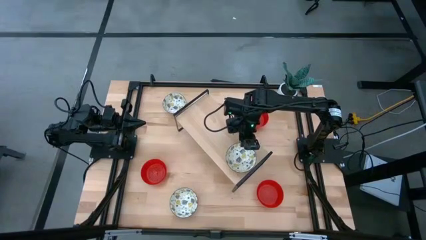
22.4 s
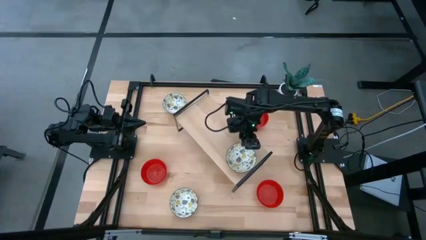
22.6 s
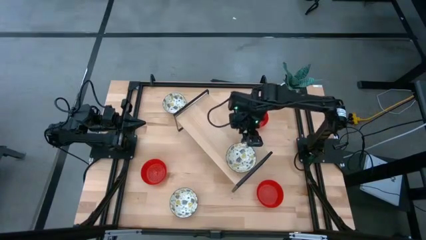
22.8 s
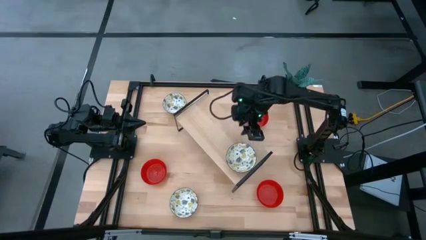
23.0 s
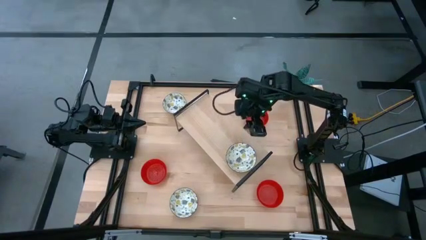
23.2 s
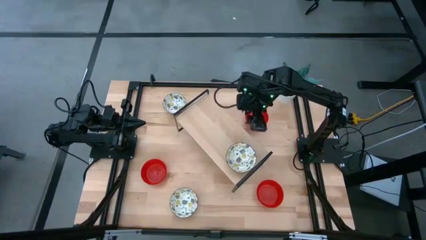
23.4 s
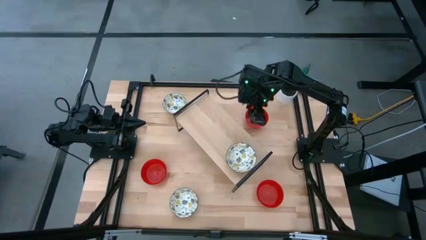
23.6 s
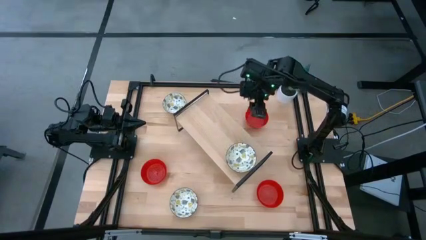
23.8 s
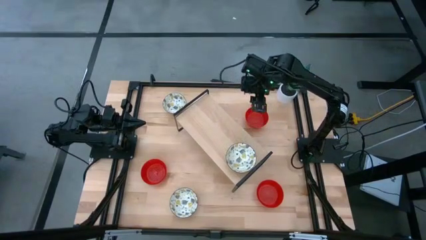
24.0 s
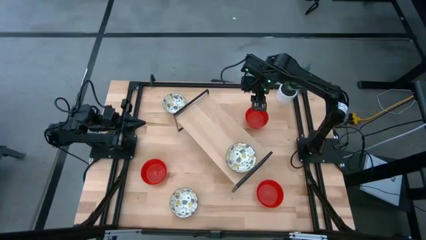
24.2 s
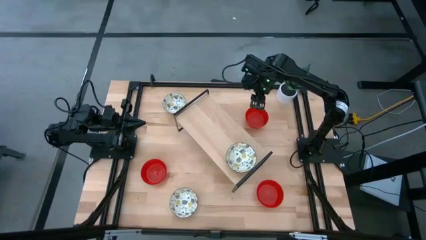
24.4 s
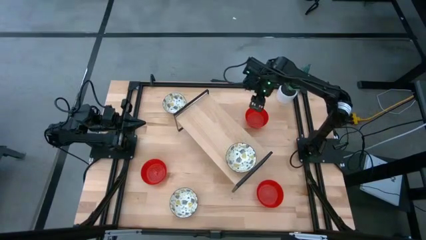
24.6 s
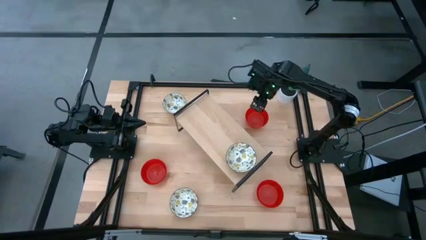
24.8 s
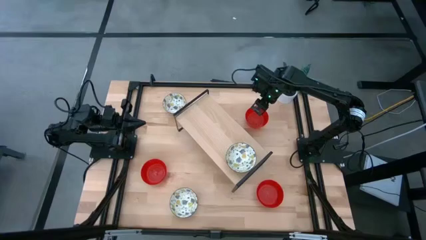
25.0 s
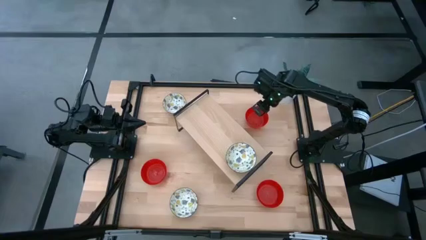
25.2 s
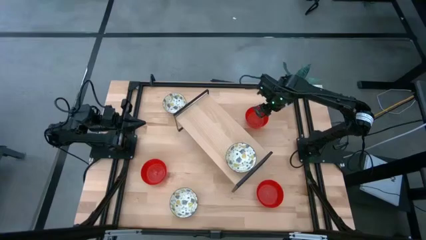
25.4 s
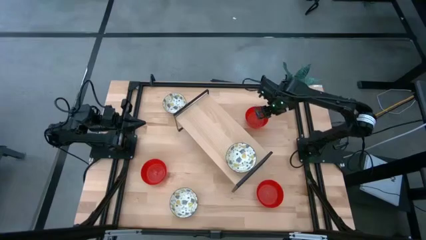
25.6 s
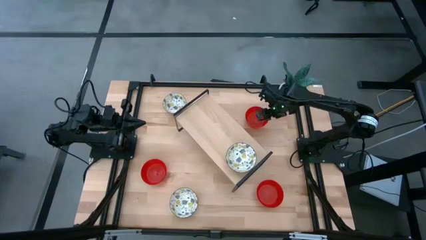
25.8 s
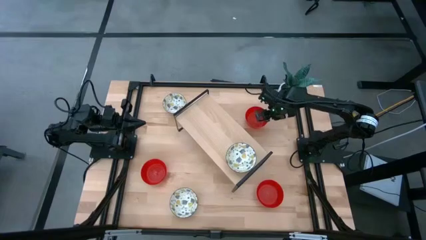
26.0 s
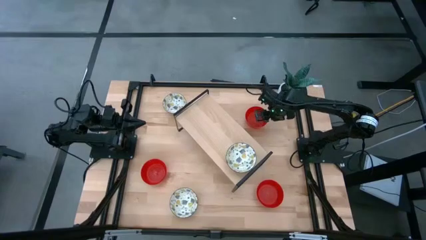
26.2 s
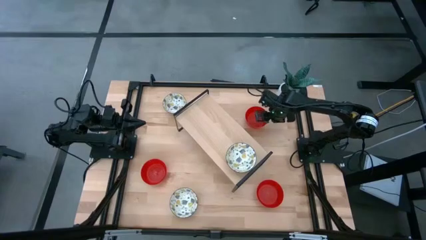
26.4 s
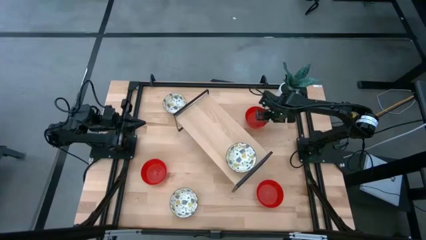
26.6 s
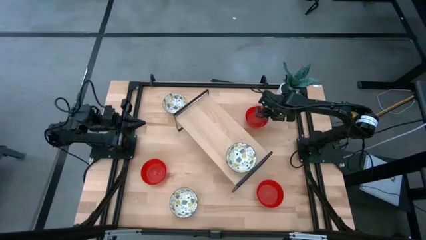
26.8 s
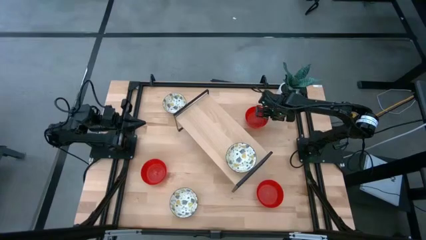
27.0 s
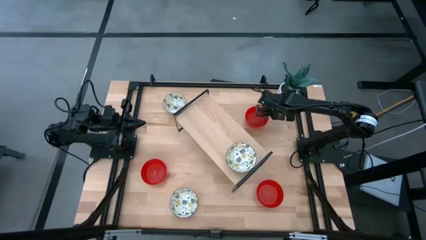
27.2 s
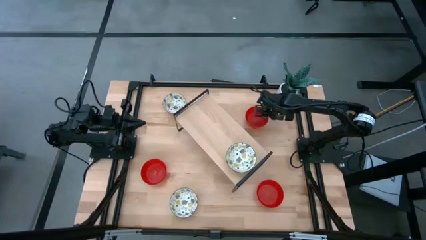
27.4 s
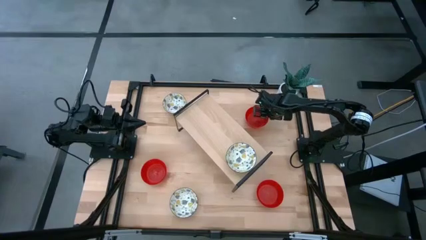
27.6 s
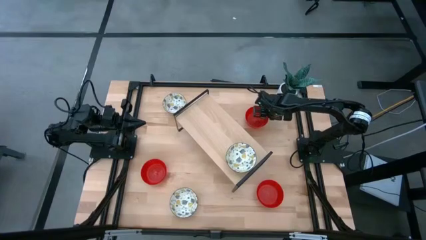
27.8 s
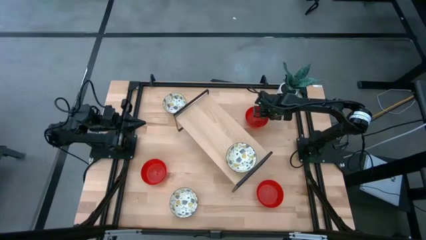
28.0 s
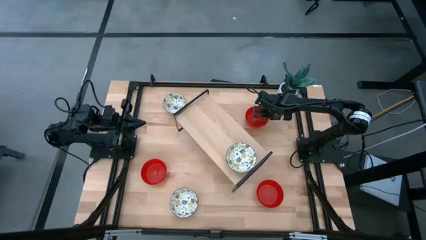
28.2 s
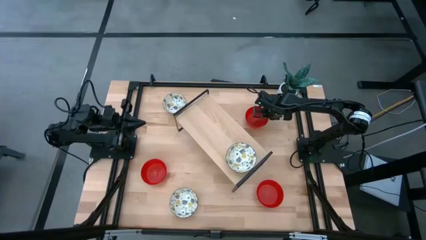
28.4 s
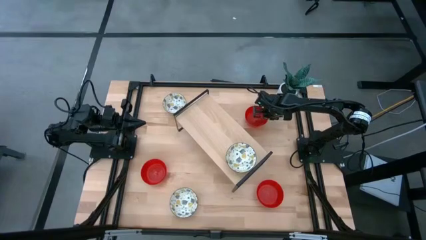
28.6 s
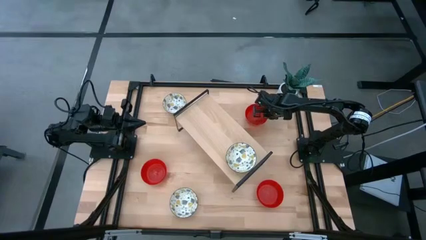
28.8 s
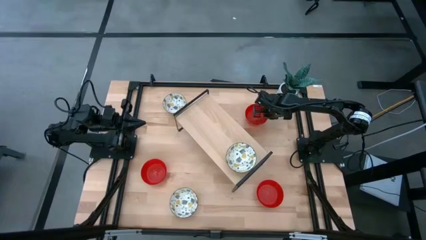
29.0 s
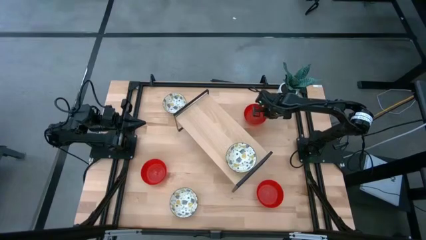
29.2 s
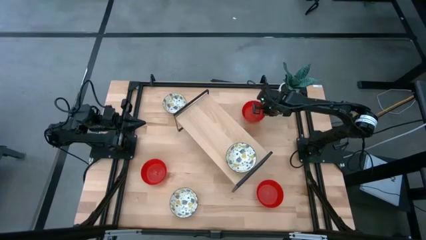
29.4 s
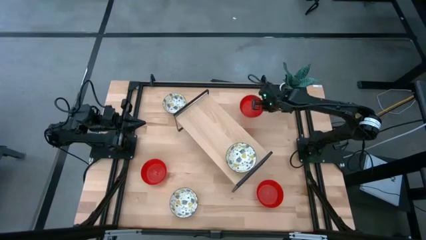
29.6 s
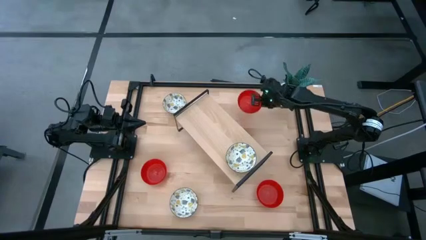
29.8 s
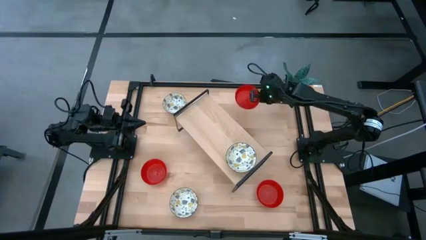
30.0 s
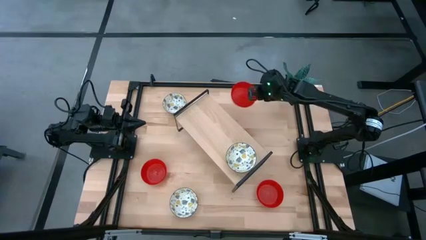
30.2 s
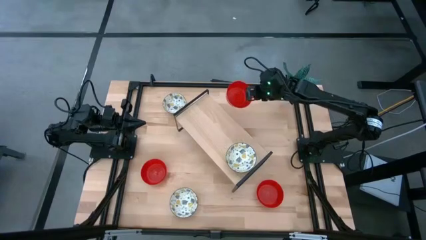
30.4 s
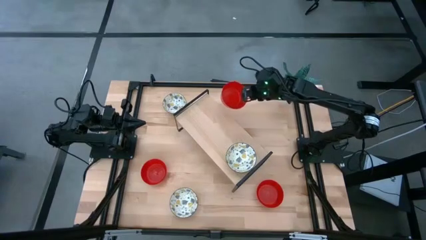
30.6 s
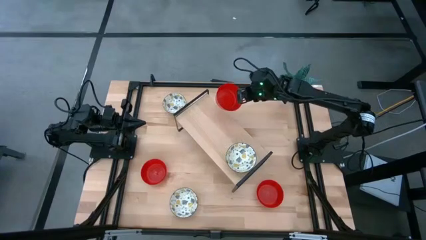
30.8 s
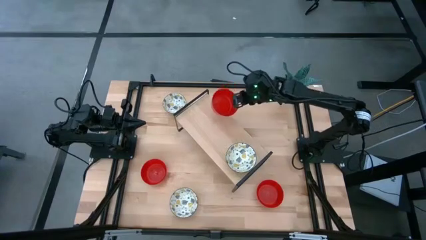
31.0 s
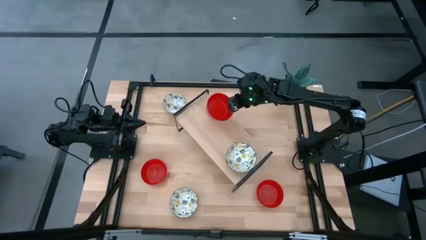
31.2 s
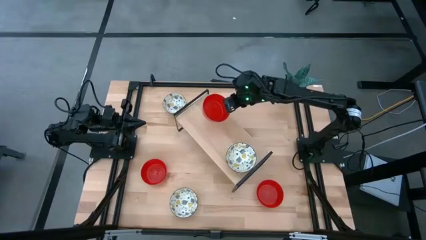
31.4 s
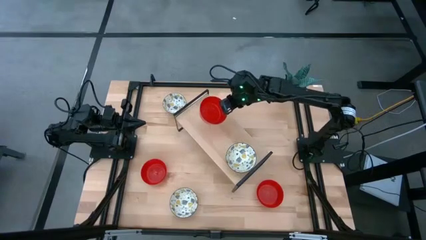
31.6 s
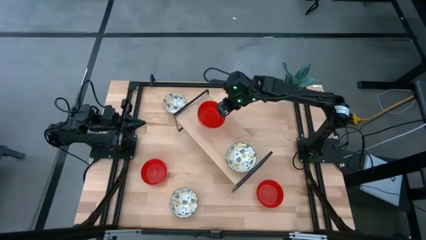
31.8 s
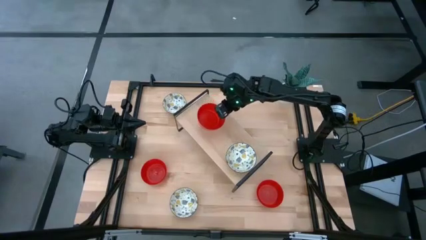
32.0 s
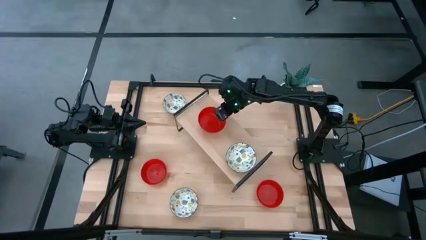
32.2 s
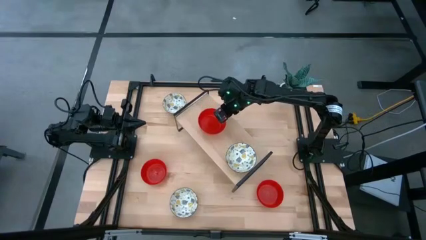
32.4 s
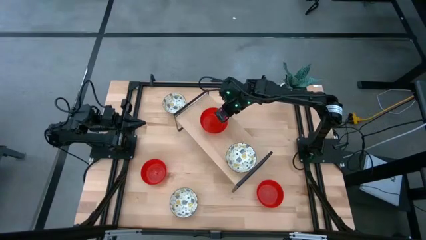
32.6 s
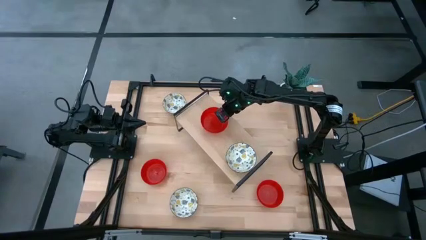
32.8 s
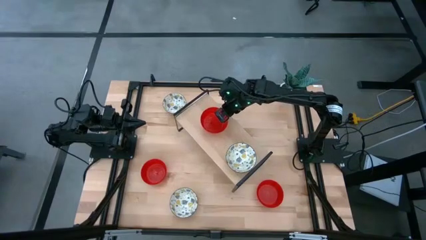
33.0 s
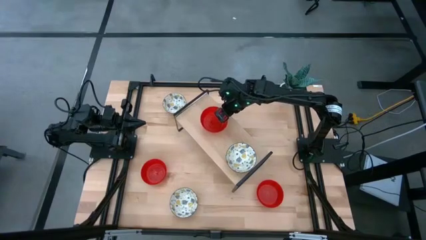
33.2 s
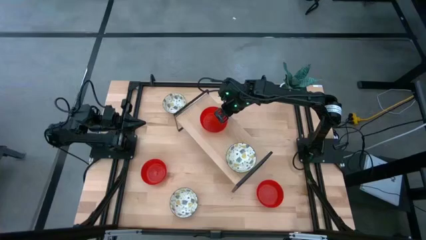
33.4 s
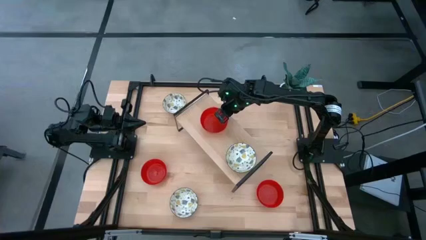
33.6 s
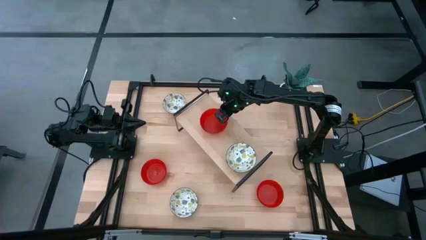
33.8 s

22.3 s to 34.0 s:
Task: Pick & Place Mini bowls
Put the top red bowl on the shelf

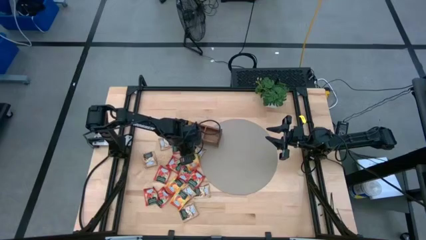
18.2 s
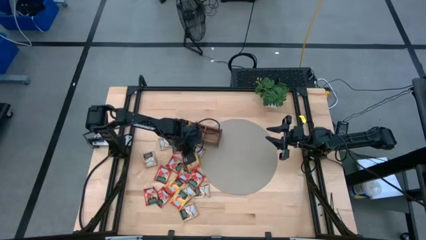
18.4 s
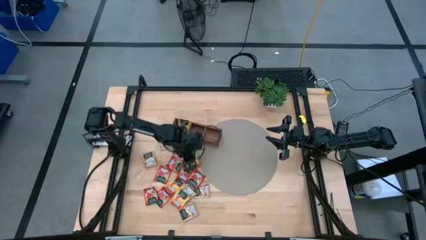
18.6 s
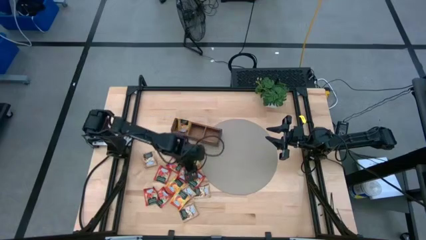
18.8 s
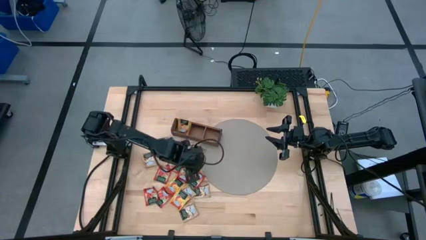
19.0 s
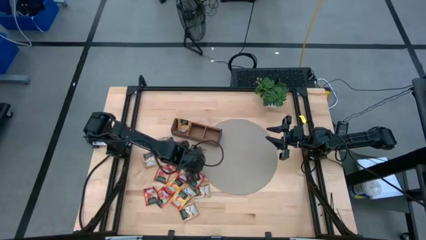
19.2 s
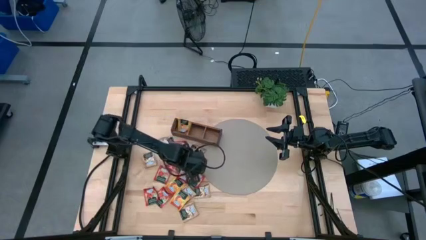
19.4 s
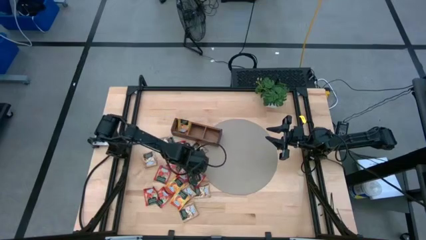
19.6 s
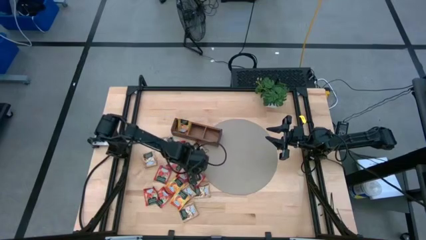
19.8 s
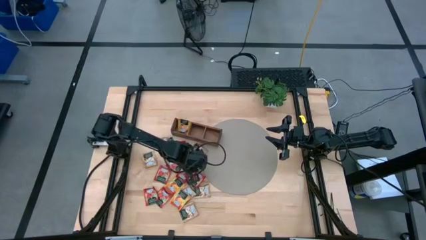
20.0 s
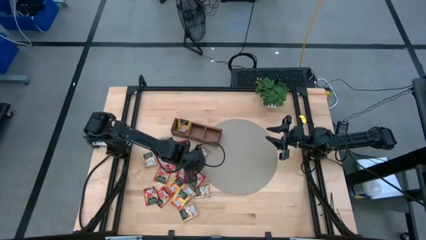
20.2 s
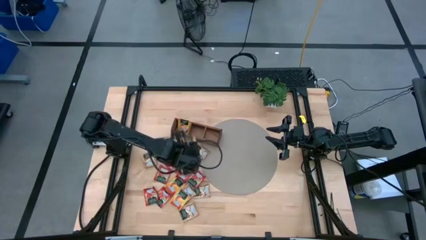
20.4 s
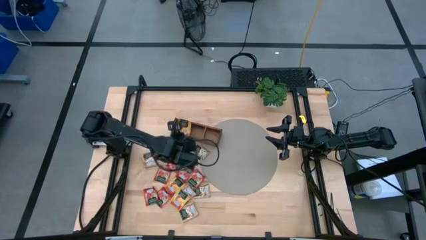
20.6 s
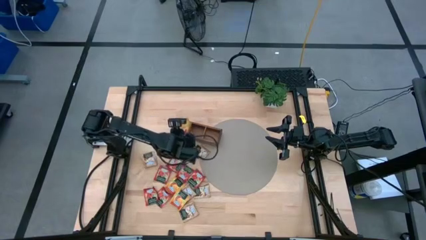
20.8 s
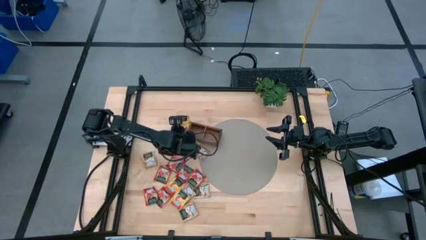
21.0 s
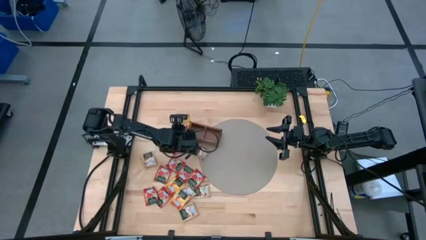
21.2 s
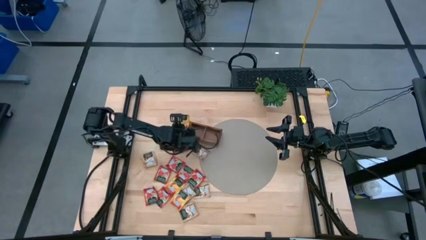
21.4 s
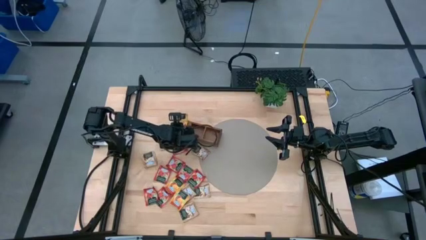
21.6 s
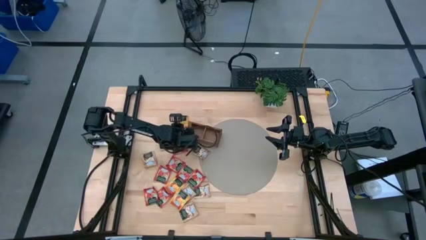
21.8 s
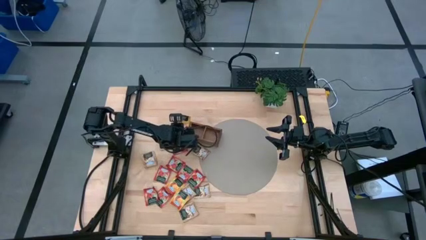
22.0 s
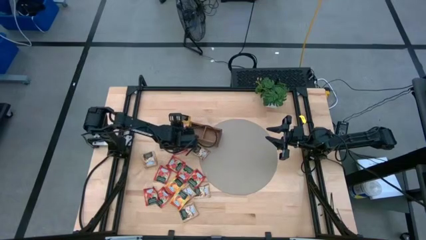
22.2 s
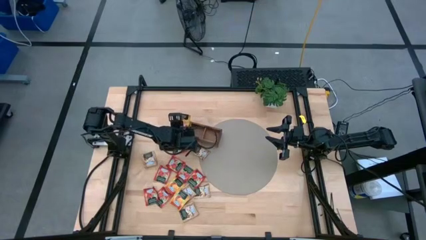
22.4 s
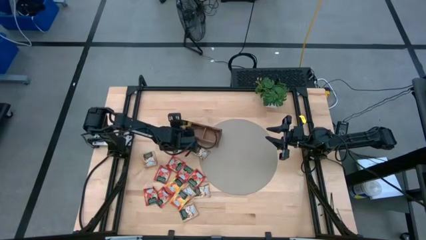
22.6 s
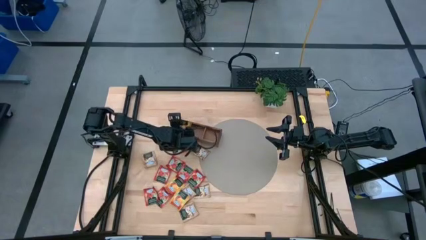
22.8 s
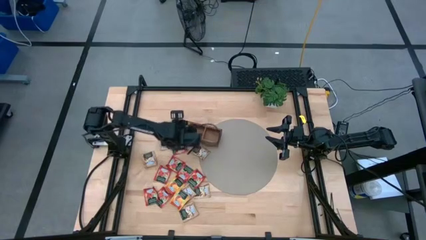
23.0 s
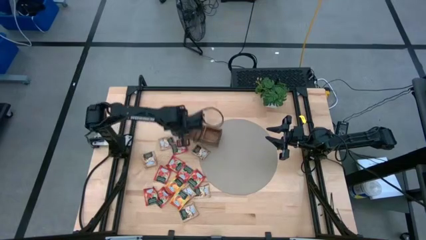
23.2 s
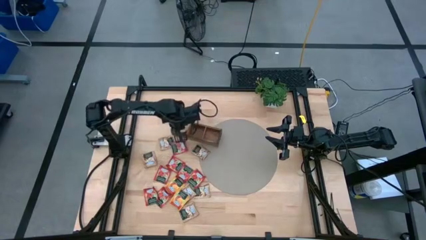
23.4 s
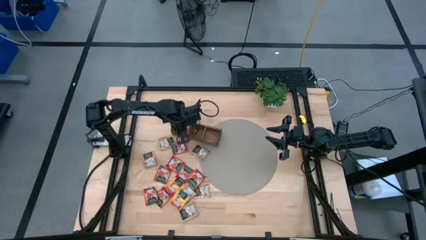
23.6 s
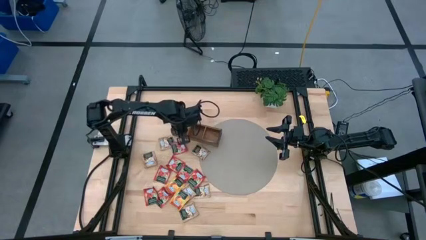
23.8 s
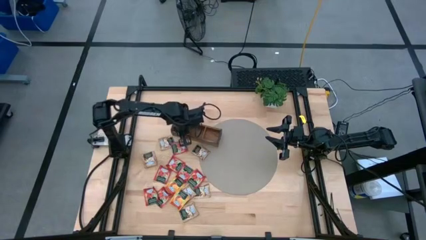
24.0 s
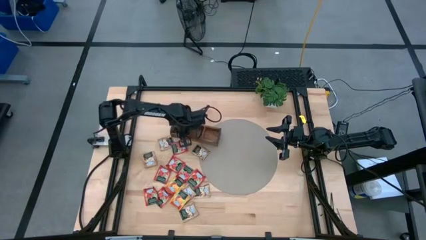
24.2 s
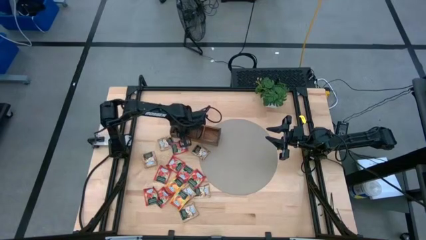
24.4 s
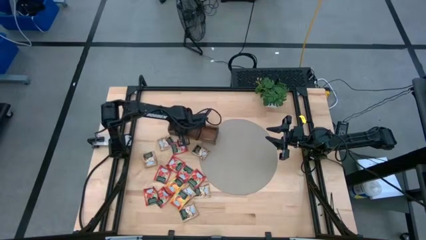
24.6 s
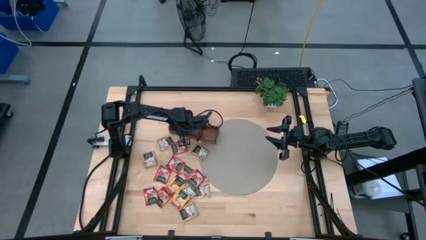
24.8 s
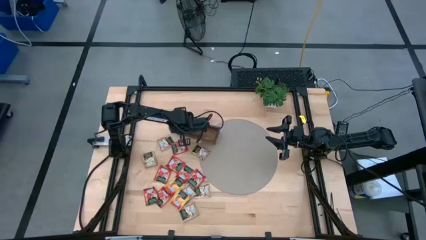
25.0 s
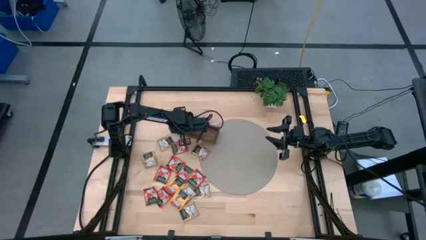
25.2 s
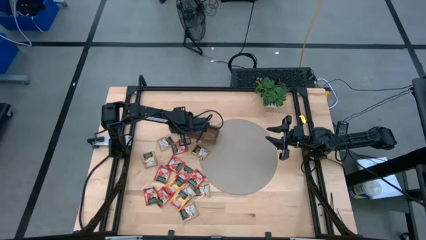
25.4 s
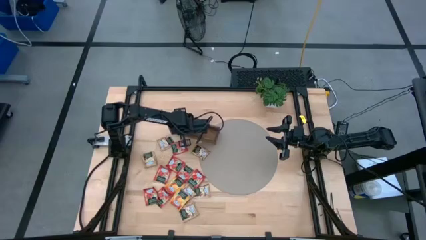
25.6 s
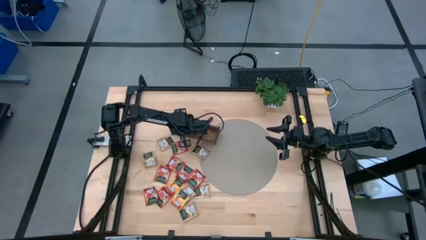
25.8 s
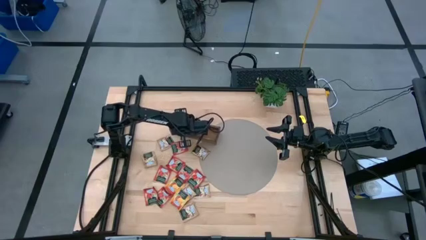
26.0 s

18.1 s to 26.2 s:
Task: Pick & Place Tea
Put the yellow tea bag into the left section of the wooden organizer
